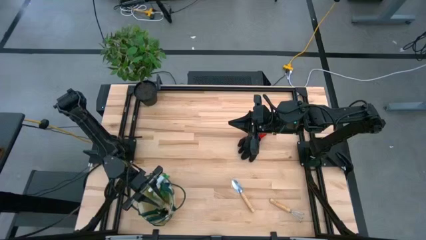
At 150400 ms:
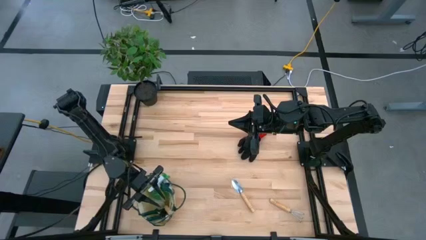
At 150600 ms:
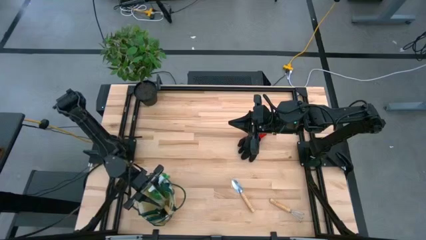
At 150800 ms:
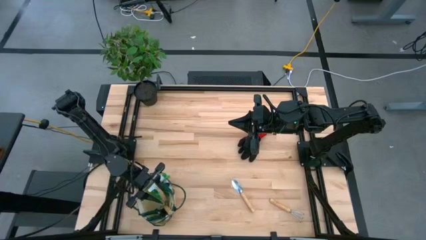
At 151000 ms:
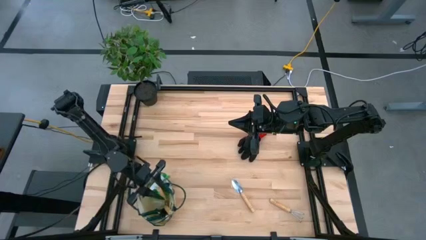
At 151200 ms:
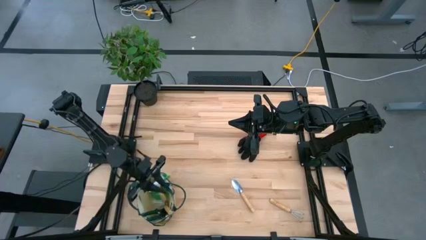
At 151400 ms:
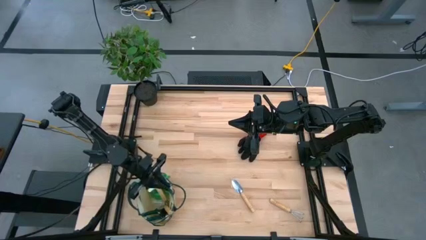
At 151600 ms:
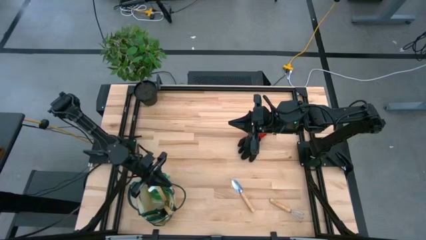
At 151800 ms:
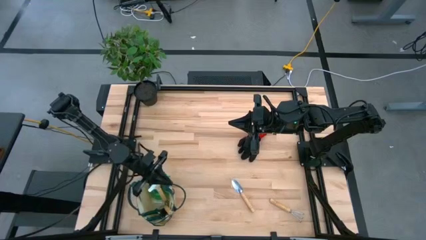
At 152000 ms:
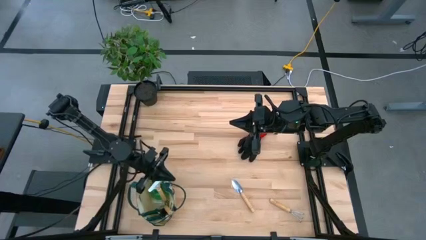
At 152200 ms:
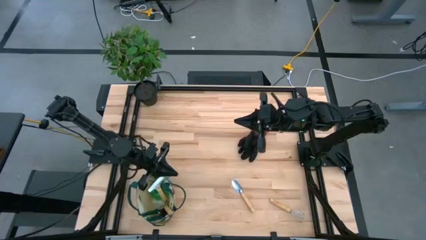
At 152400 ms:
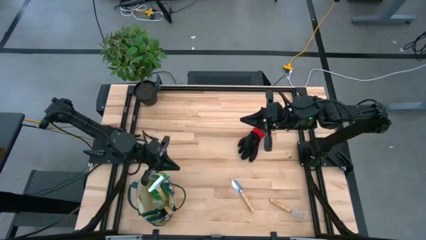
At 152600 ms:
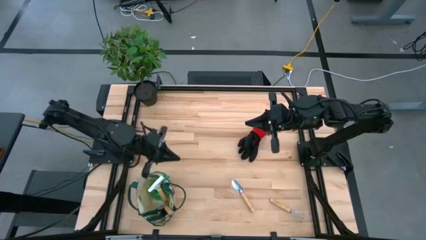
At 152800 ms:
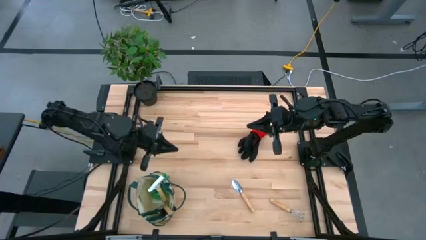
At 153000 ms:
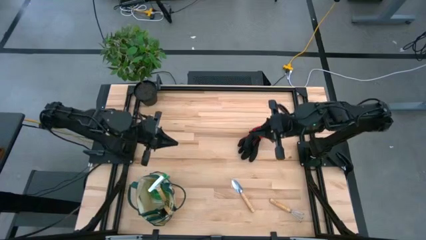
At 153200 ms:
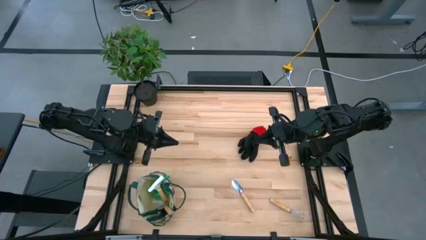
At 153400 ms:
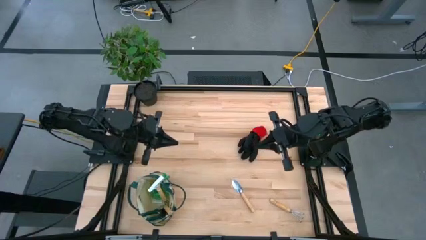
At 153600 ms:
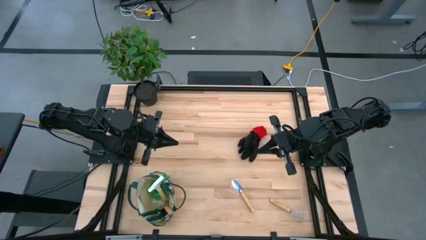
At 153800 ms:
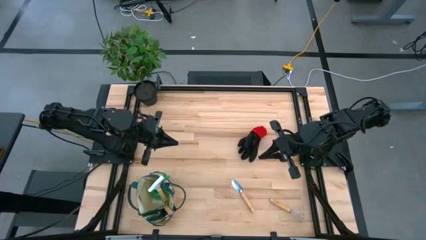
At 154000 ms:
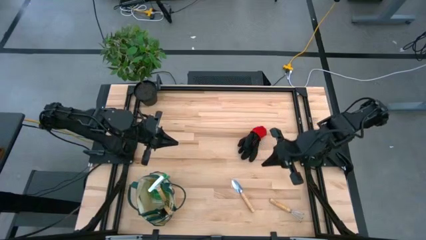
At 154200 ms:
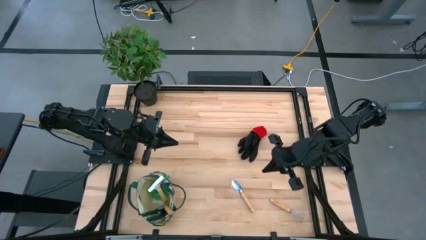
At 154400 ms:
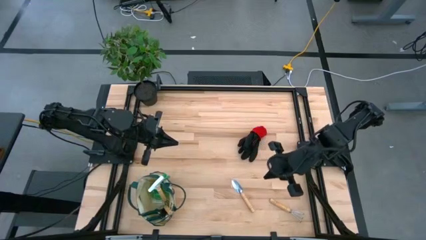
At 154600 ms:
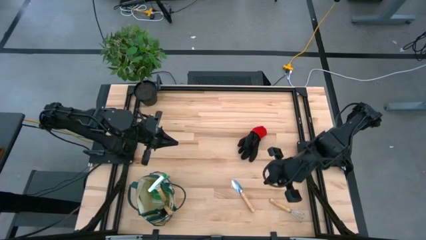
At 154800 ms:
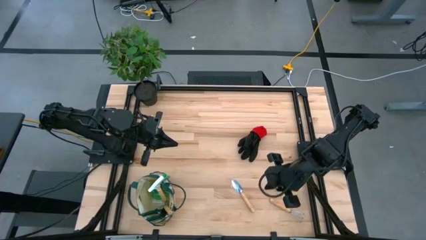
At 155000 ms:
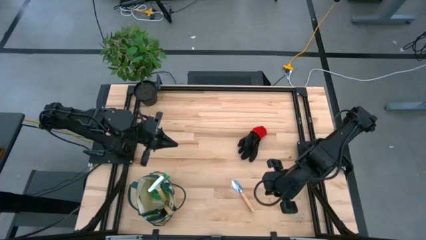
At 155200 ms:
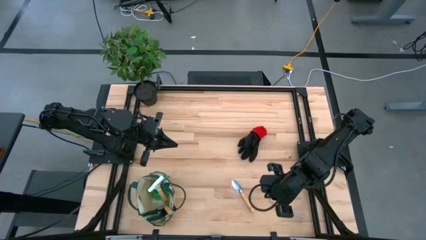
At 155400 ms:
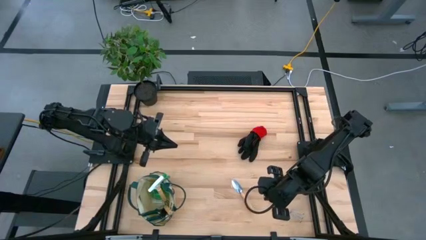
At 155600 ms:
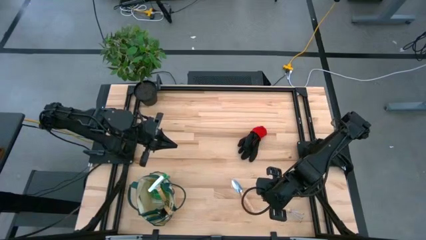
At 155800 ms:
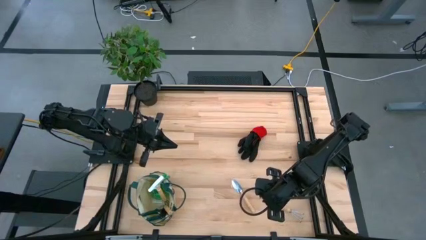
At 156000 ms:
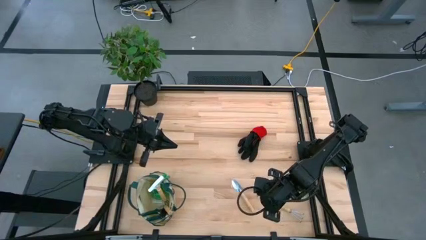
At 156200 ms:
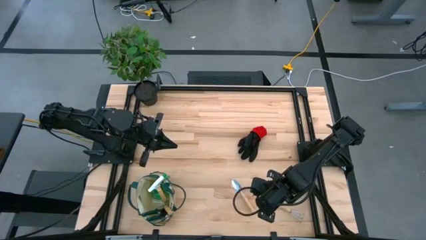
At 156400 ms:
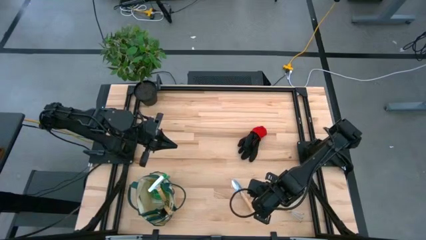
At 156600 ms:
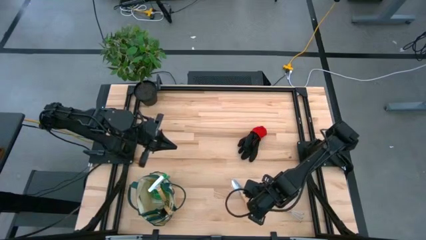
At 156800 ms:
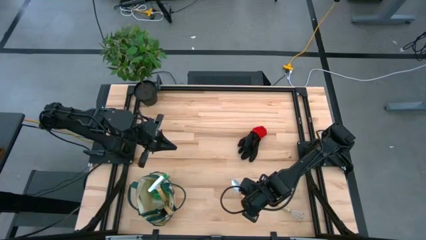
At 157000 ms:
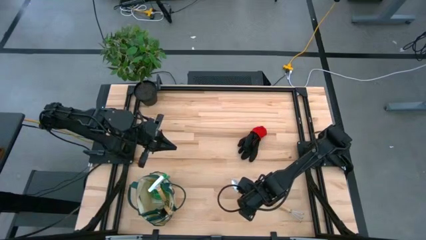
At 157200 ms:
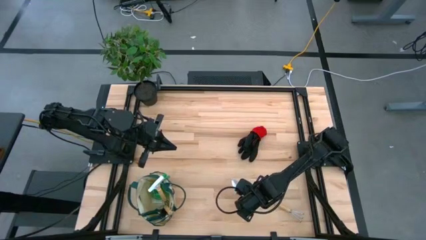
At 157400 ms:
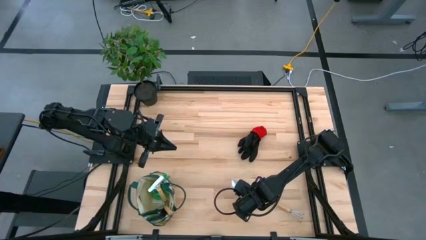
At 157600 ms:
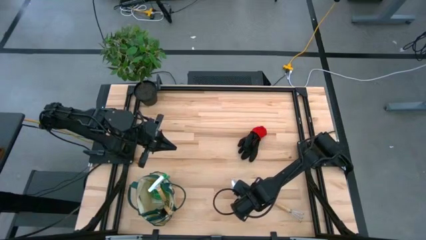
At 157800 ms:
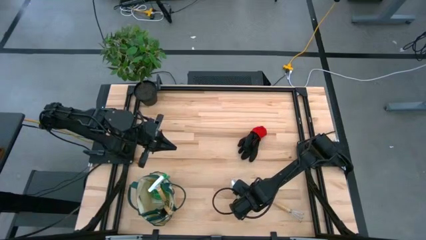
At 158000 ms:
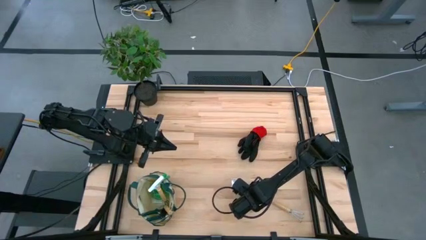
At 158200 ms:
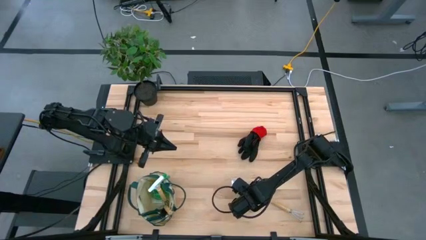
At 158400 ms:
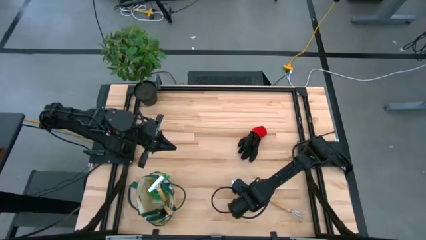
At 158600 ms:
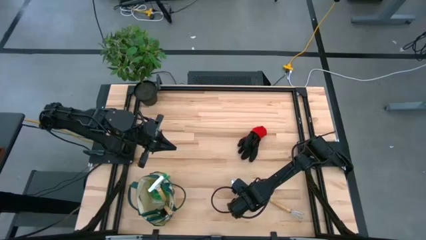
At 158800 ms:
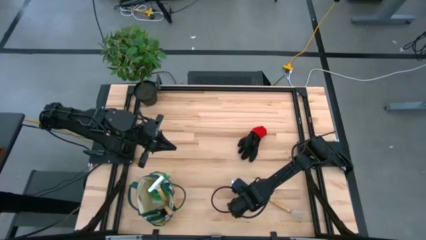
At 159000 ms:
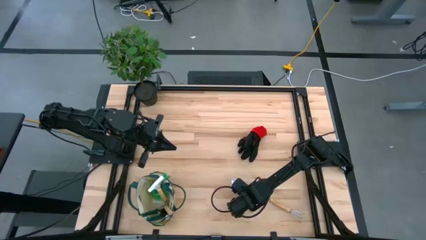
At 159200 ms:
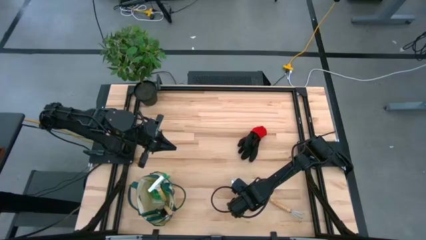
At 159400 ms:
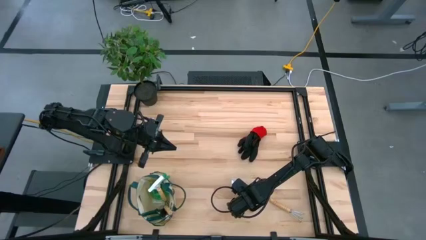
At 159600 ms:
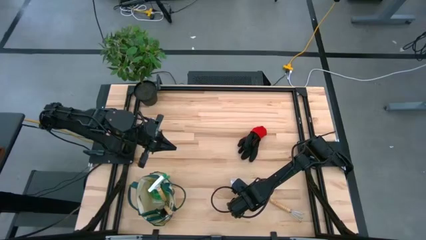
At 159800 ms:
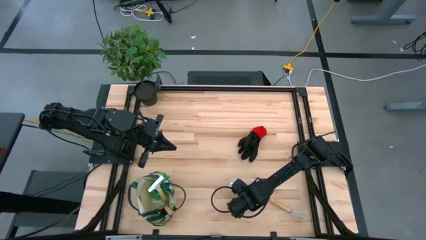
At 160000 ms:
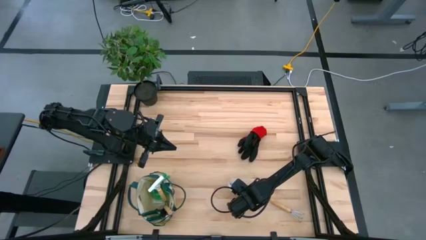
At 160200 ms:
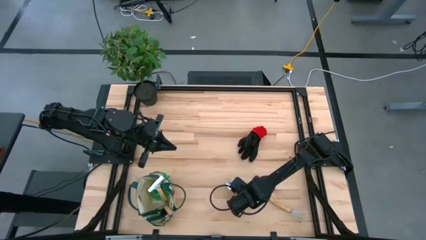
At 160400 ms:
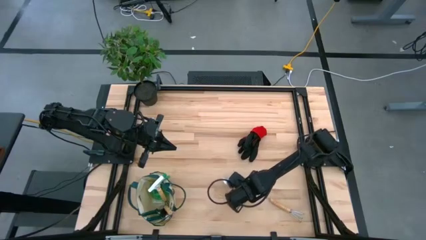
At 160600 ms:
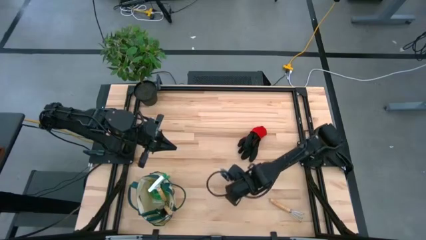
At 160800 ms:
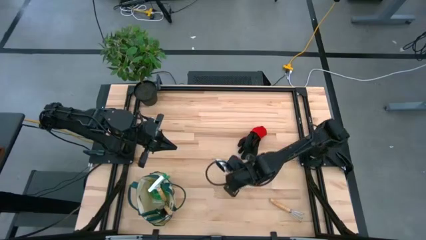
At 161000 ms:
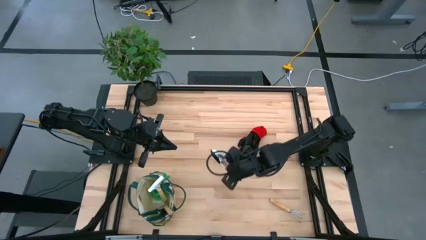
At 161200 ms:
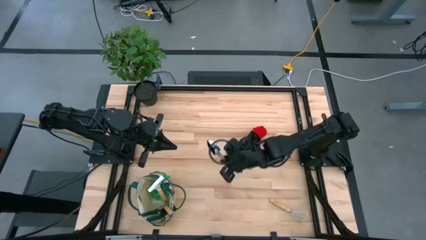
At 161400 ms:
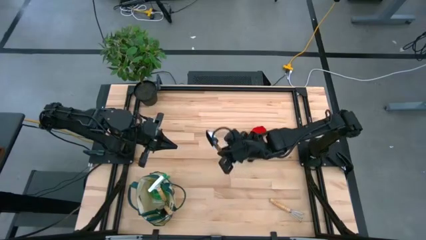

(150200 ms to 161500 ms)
Task: Pick & Place Garden tools in Gardening bag
Put the trowel into the gardening bag
